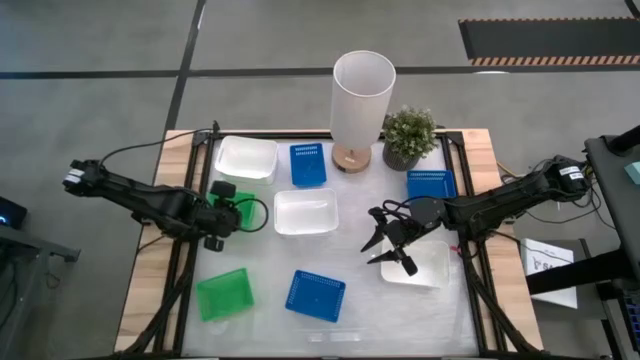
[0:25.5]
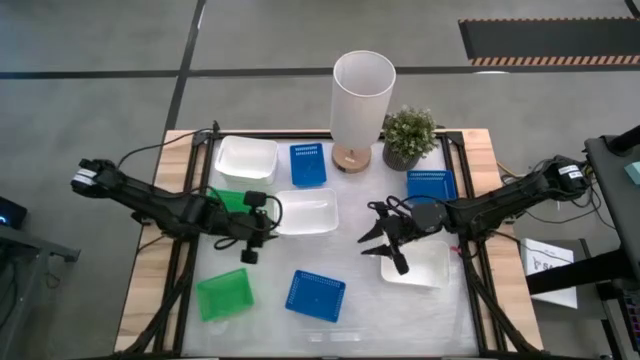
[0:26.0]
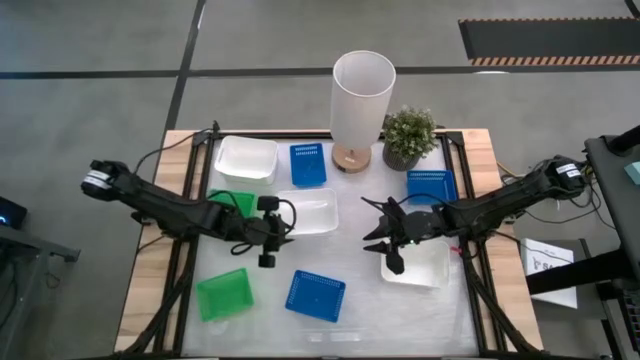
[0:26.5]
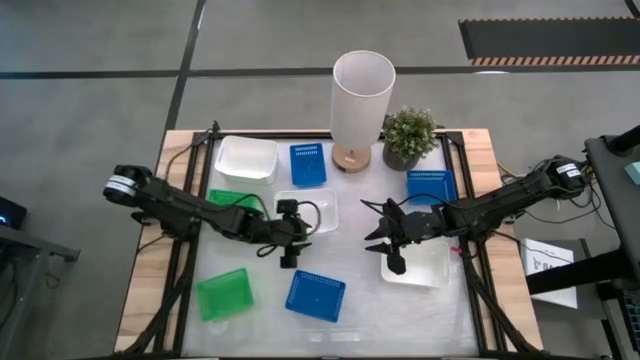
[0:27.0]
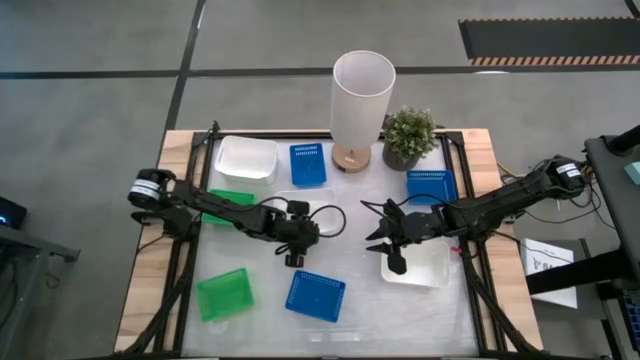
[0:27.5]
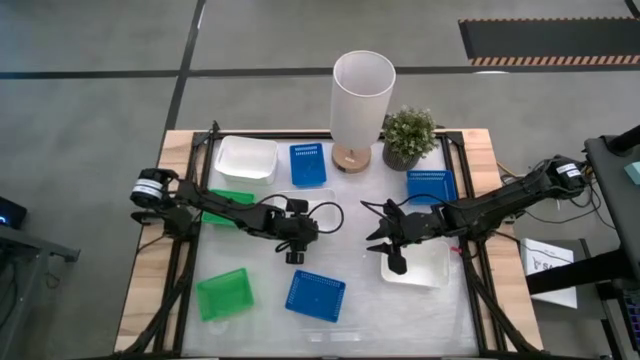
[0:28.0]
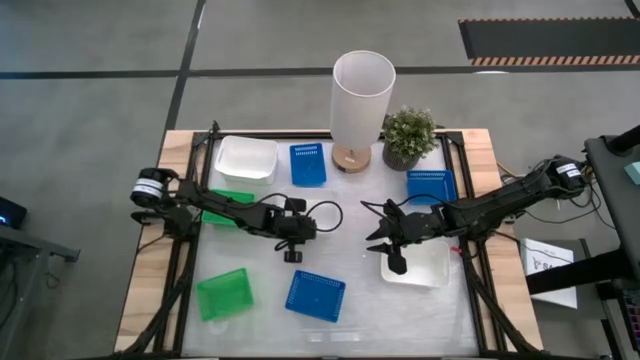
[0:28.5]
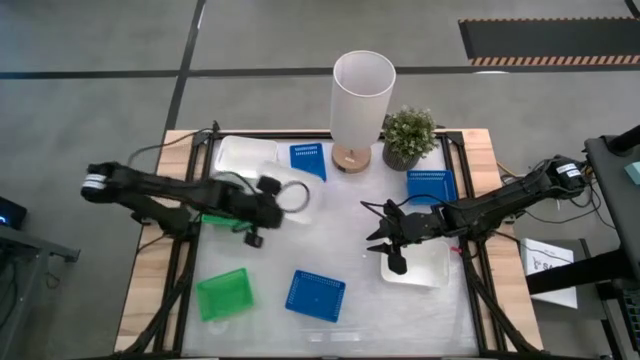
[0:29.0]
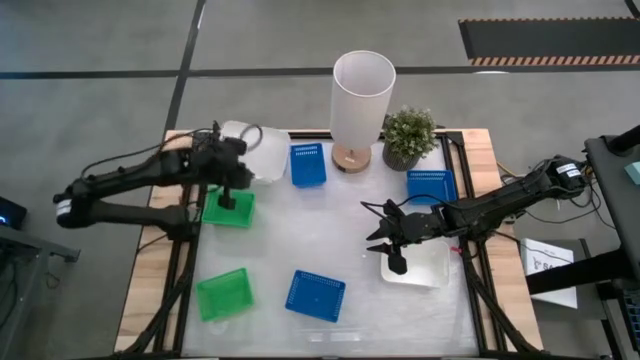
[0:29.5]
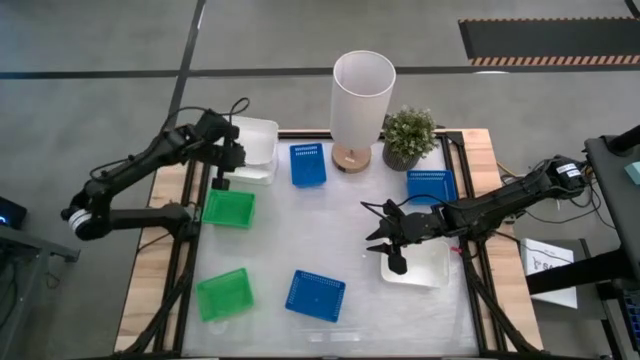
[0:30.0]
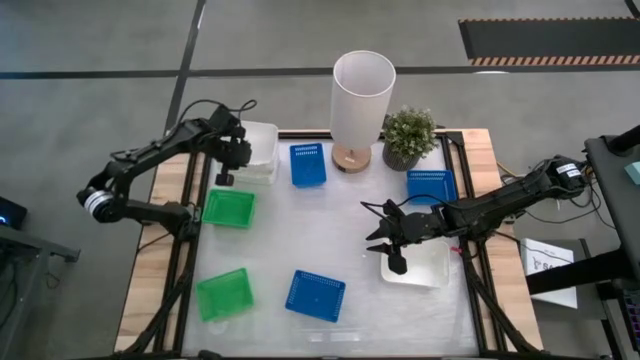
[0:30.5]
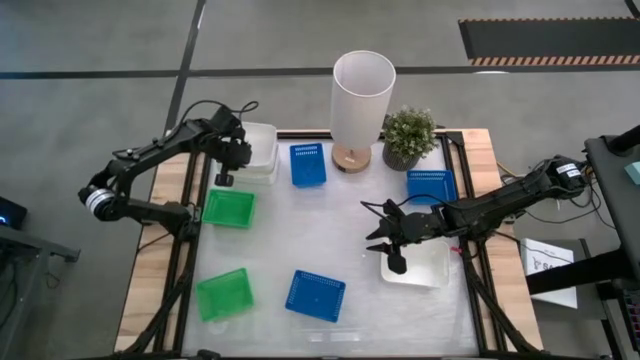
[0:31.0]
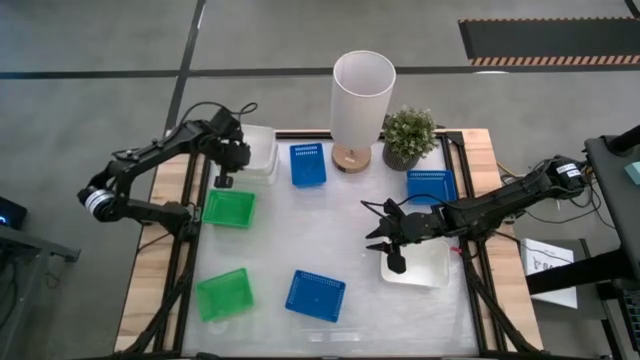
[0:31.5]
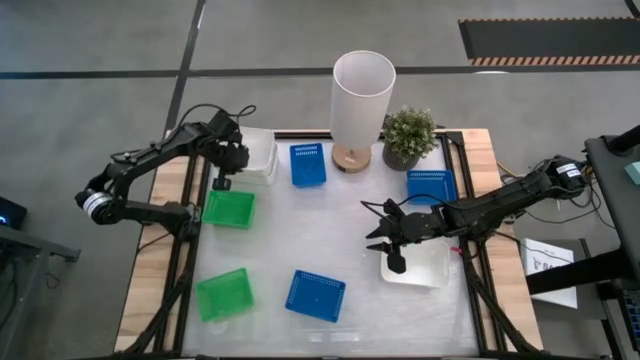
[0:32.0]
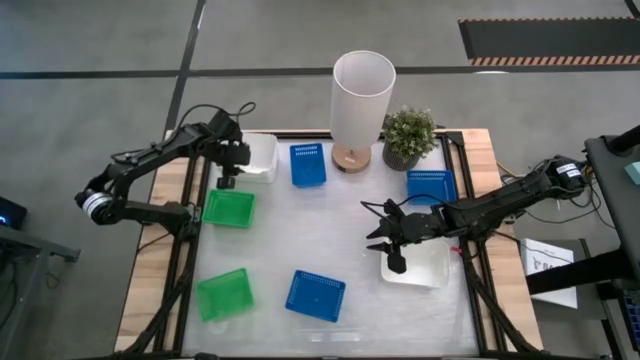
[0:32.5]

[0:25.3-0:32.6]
Stack the bottom left white bin on the top white bin

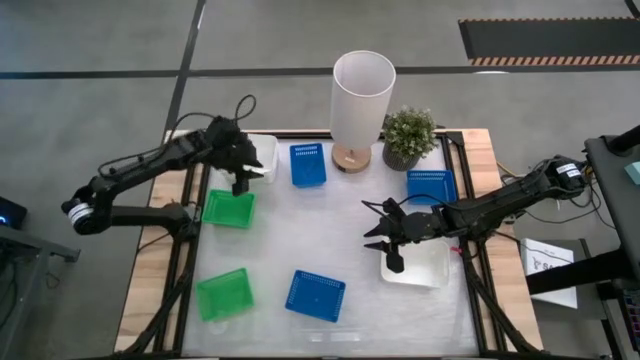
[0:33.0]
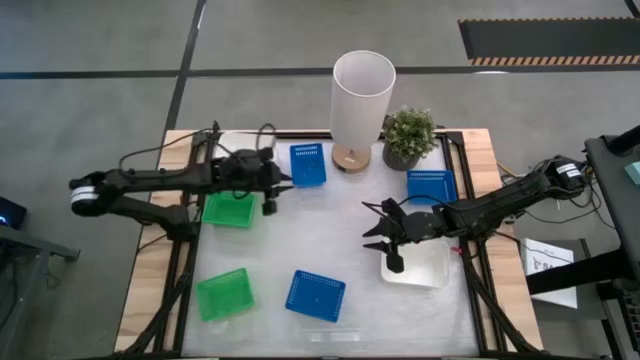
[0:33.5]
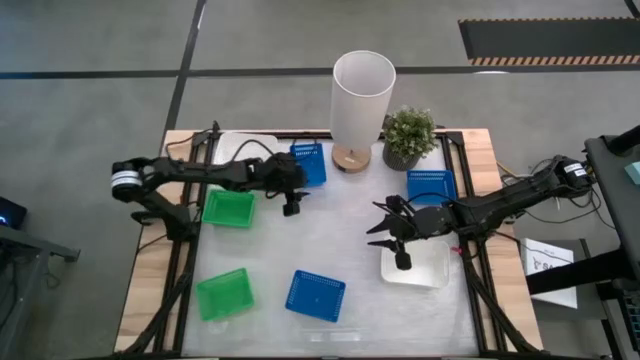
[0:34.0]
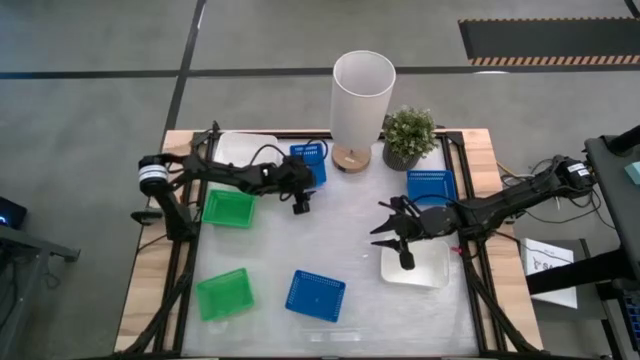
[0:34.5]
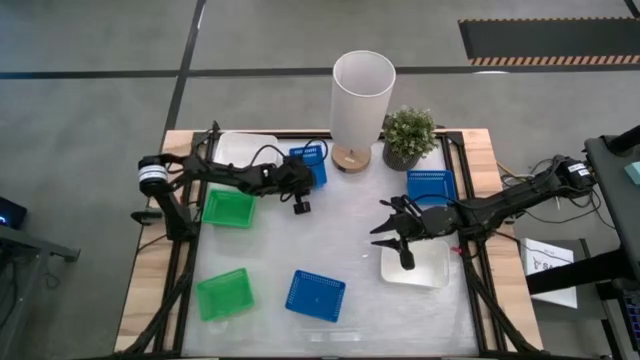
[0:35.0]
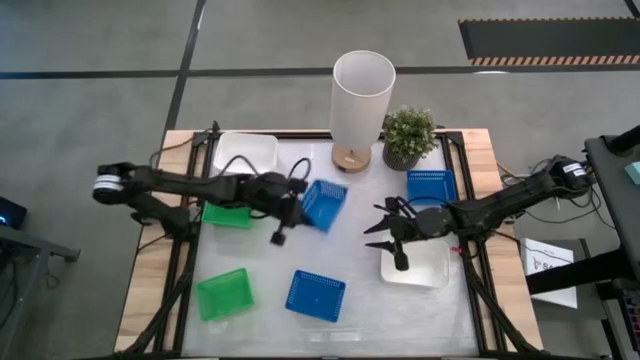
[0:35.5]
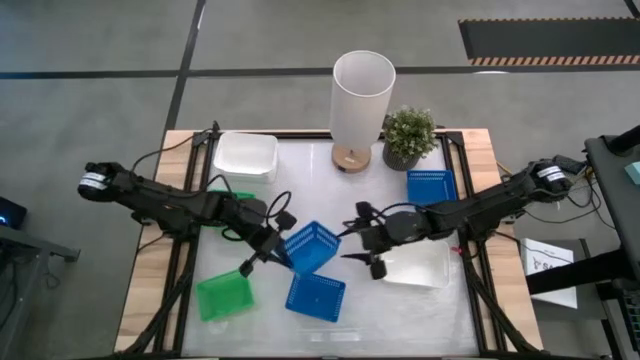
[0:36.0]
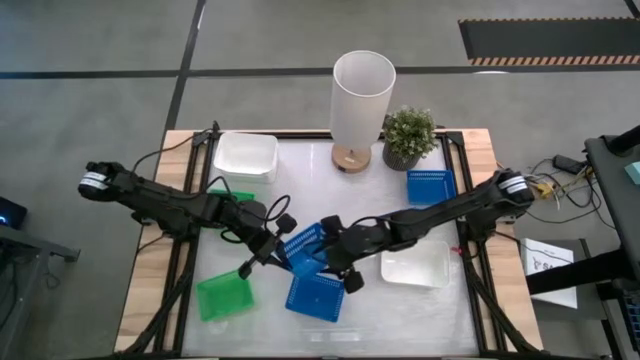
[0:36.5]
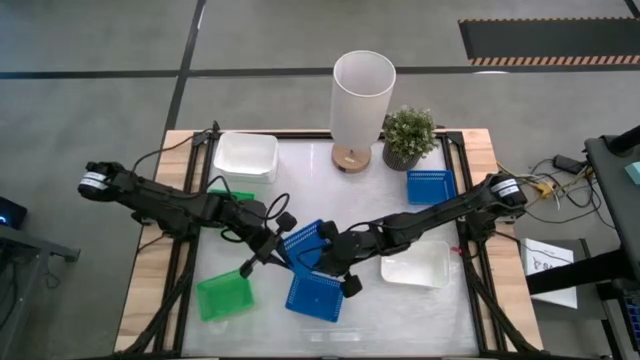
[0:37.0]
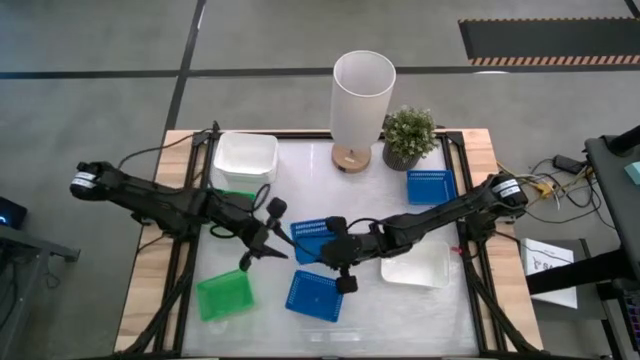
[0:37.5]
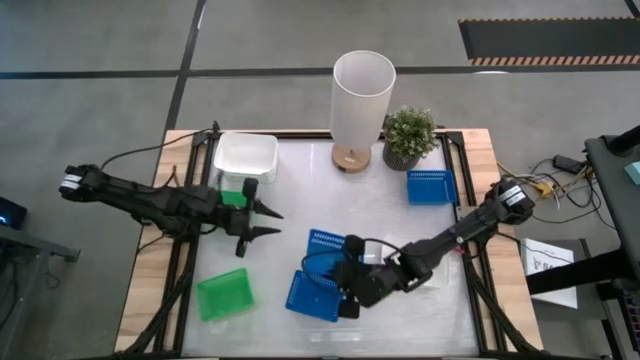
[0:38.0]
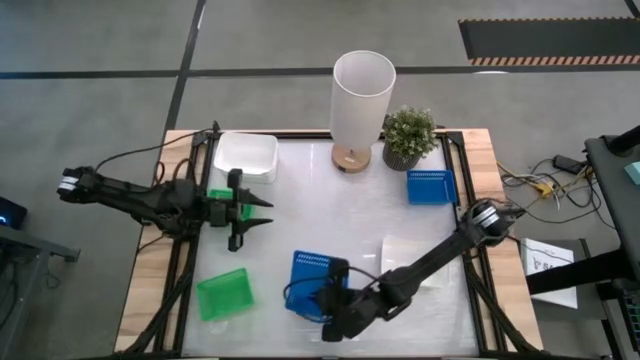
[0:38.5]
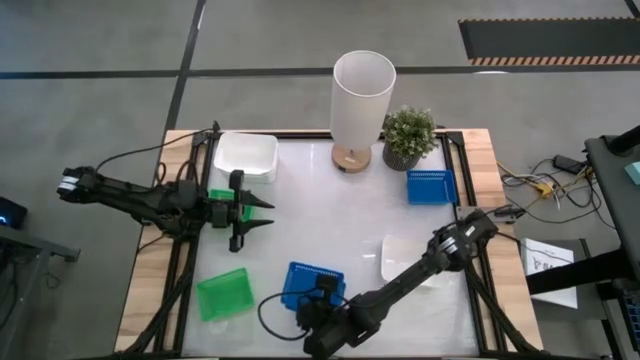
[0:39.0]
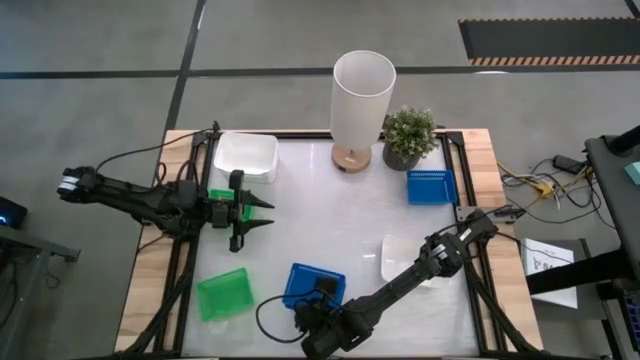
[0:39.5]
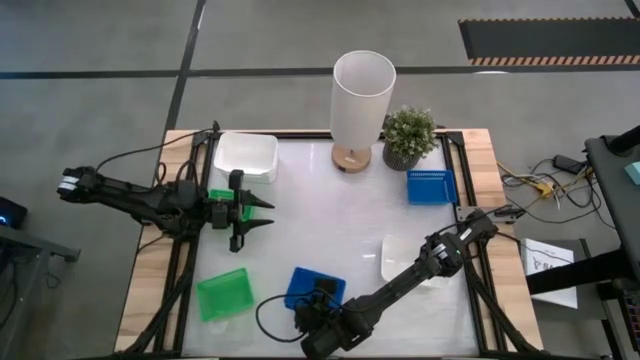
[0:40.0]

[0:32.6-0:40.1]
Stack the top left blue bin on the bottom blue bin

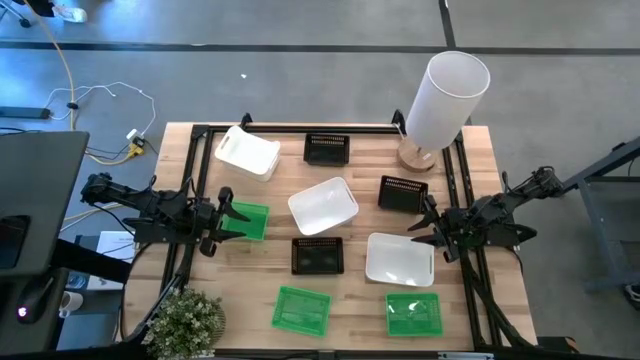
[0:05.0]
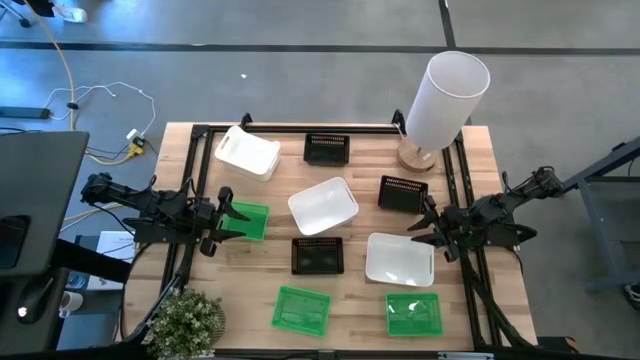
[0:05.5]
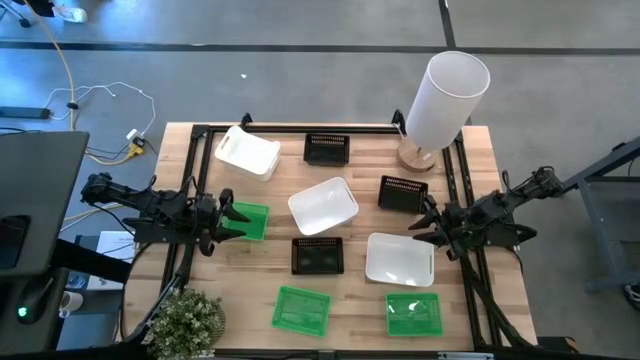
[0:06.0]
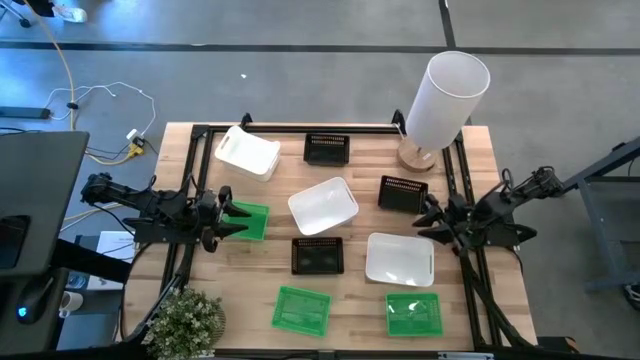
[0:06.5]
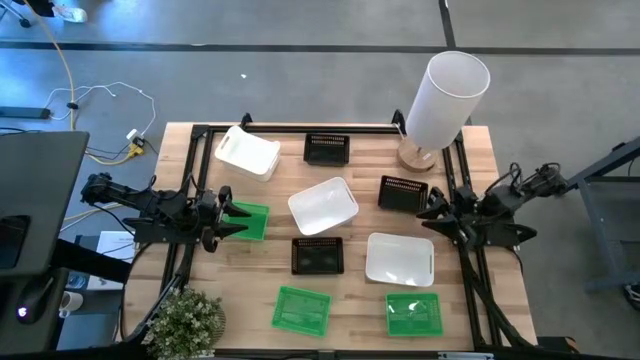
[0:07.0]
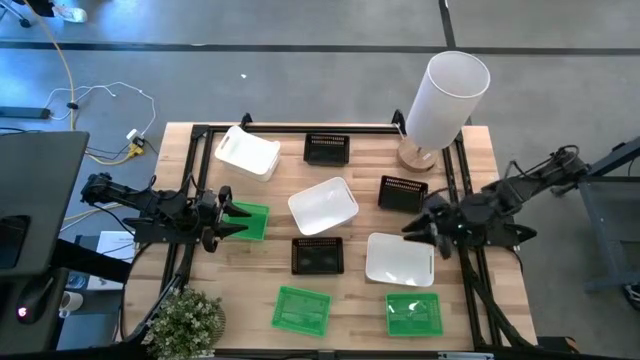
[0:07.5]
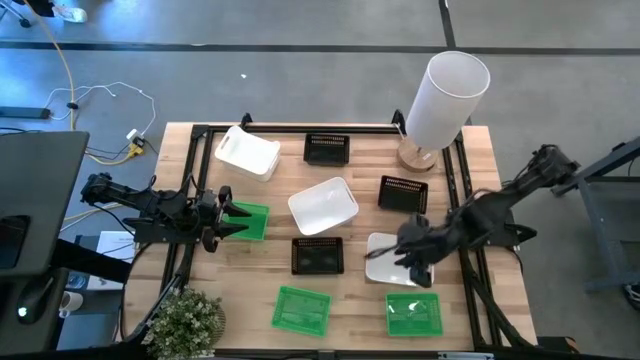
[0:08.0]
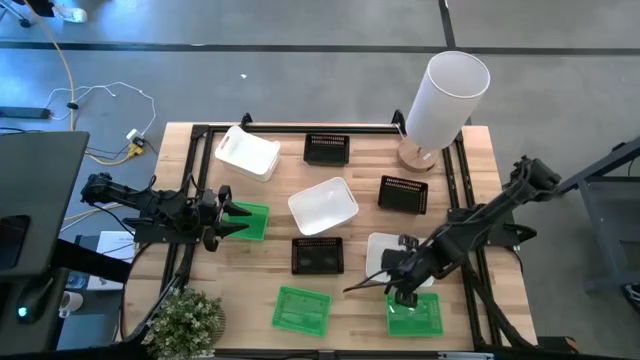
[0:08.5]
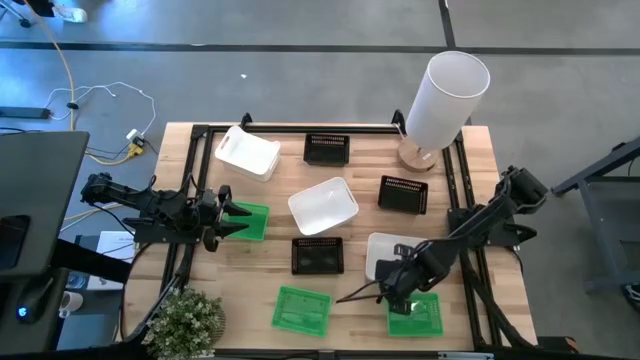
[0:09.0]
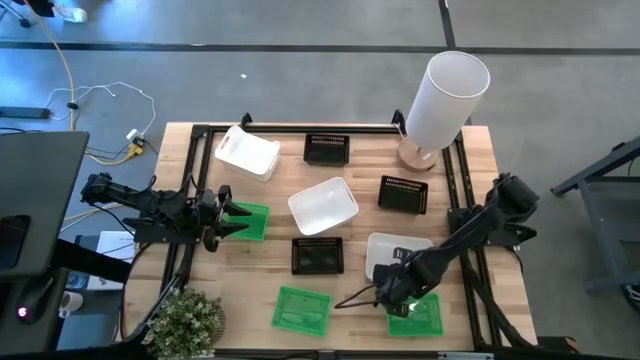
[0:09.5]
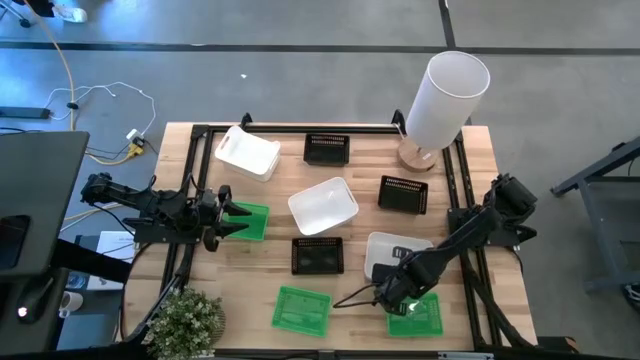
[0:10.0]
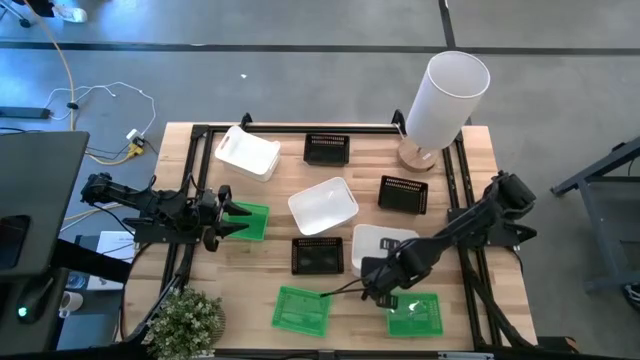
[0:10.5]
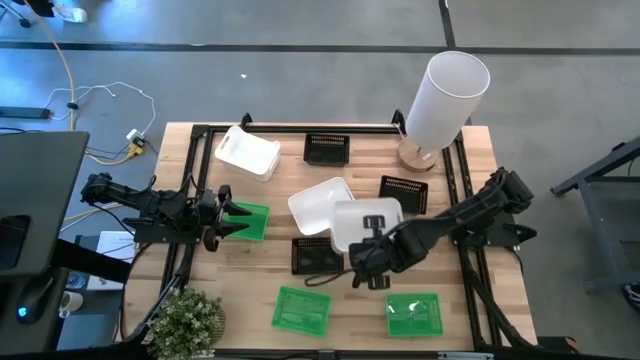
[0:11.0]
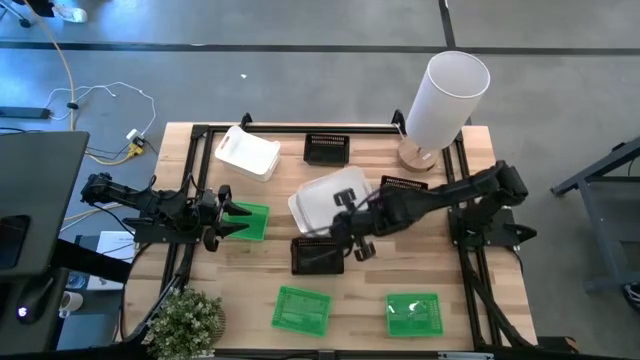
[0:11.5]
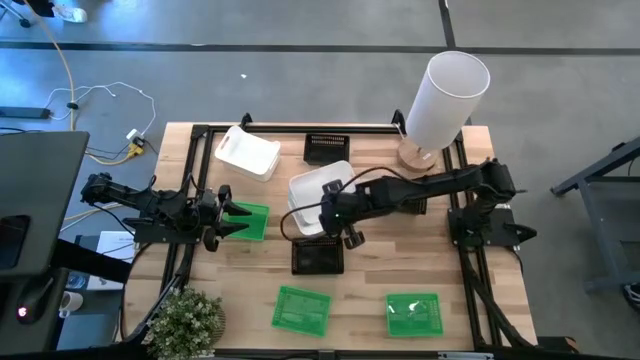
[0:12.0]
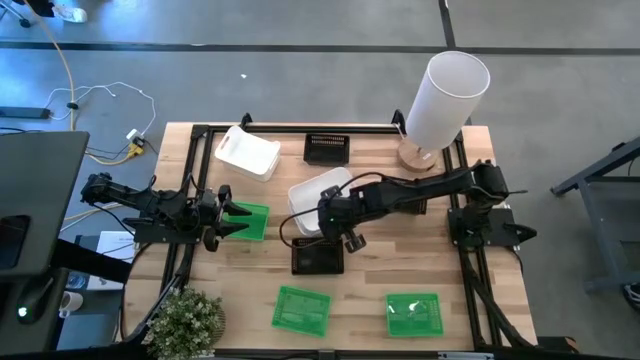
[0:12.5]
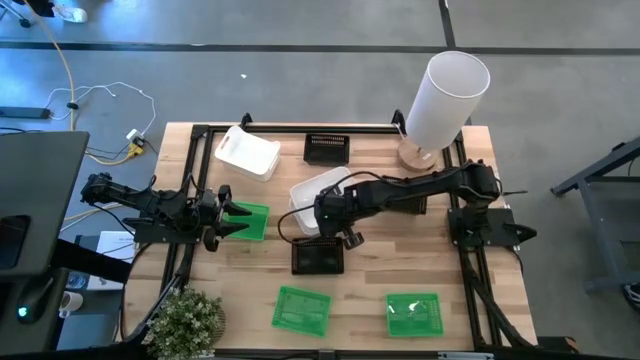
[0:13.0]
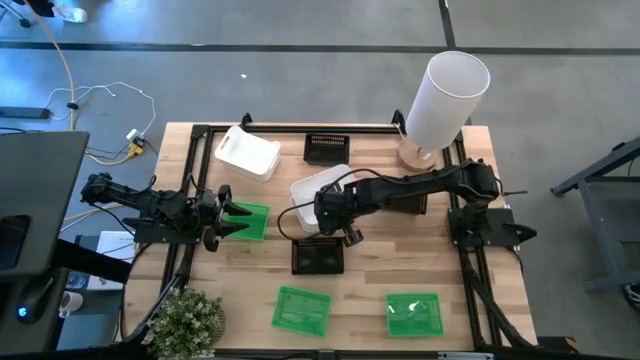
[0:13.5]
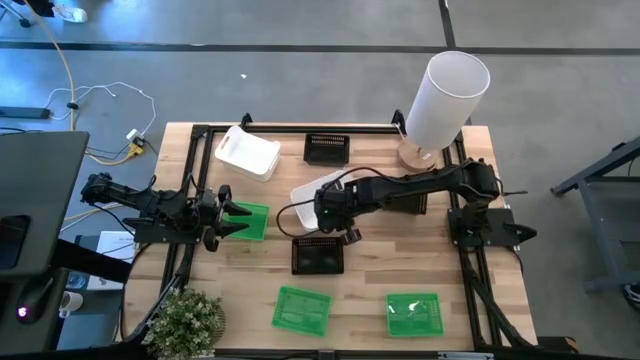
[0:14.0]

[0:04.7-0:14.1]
Stack the bottom white bin on top of the middle white bin
